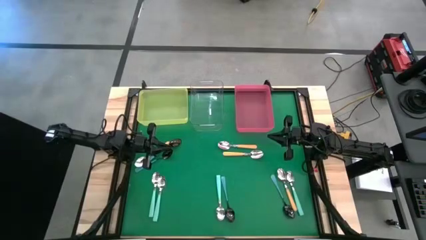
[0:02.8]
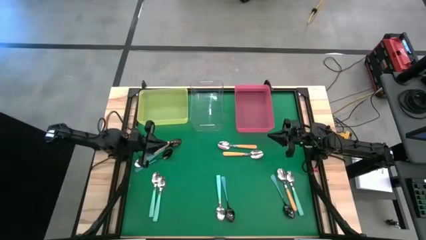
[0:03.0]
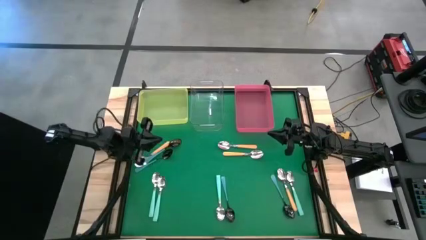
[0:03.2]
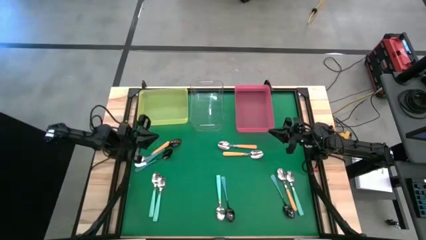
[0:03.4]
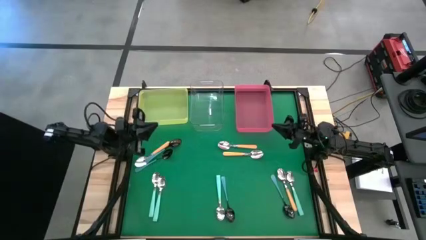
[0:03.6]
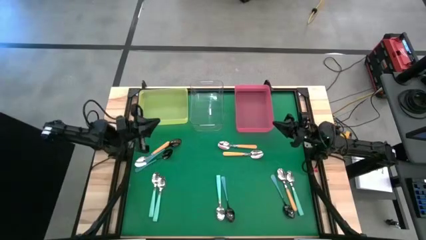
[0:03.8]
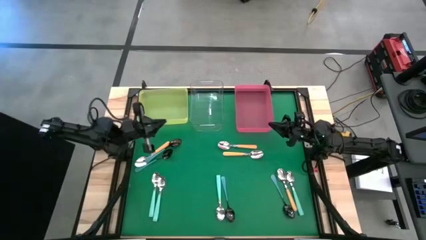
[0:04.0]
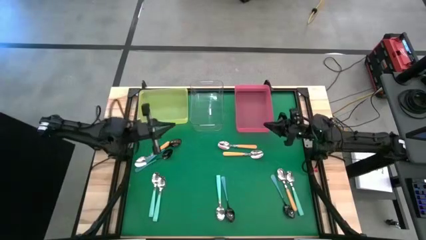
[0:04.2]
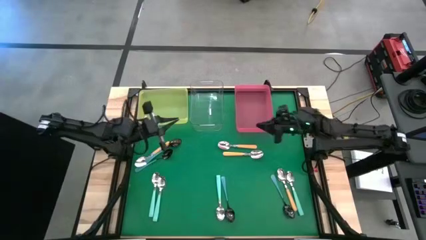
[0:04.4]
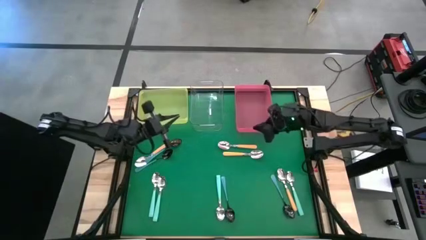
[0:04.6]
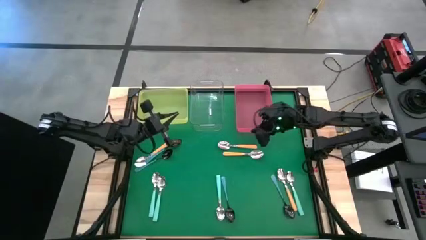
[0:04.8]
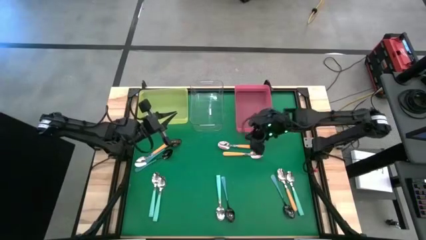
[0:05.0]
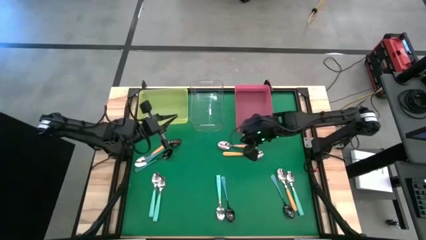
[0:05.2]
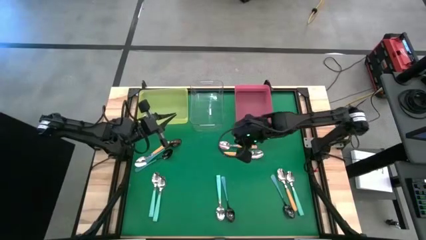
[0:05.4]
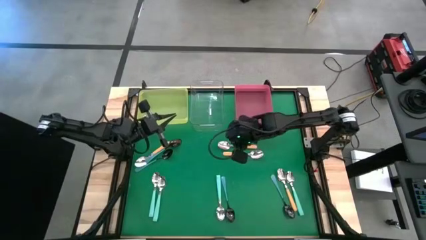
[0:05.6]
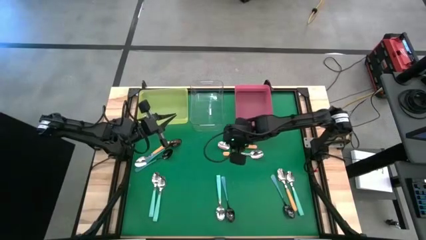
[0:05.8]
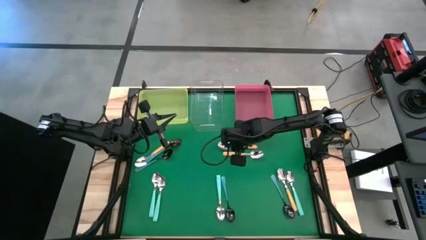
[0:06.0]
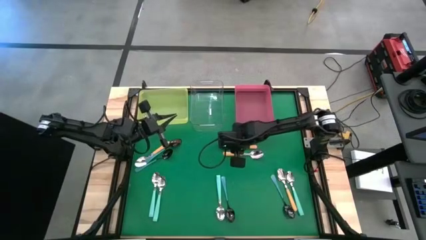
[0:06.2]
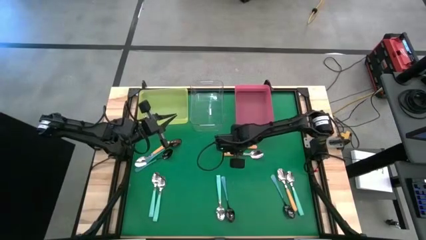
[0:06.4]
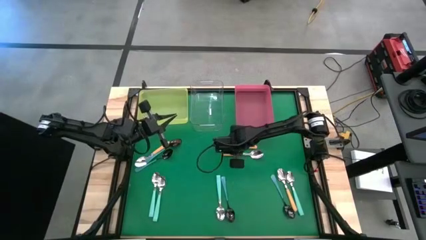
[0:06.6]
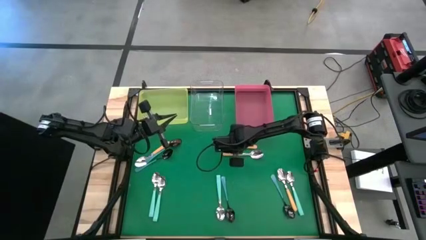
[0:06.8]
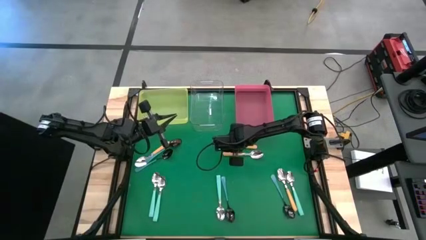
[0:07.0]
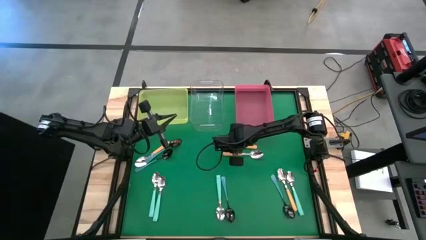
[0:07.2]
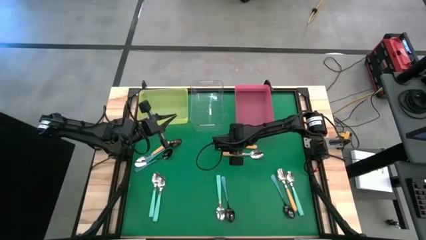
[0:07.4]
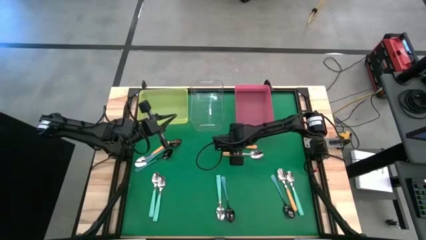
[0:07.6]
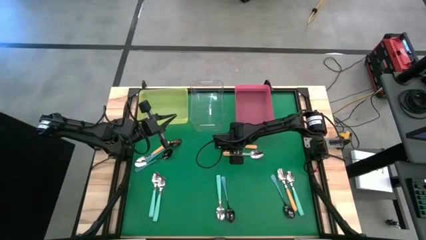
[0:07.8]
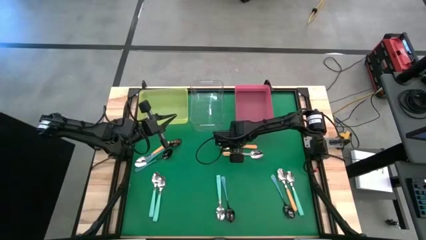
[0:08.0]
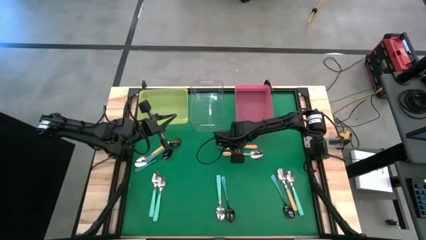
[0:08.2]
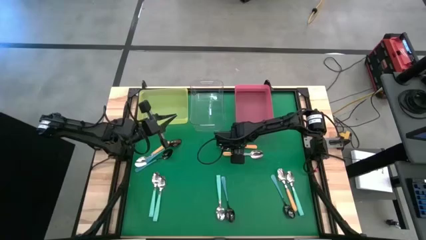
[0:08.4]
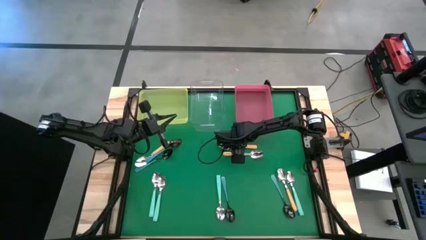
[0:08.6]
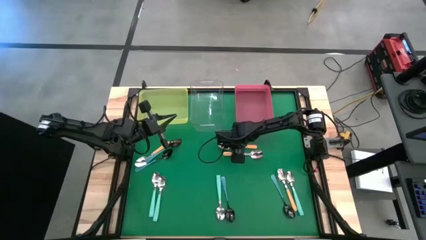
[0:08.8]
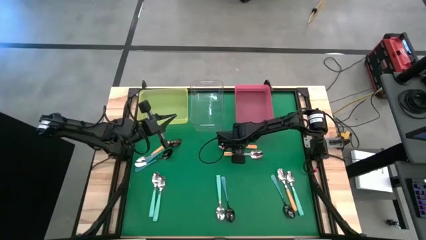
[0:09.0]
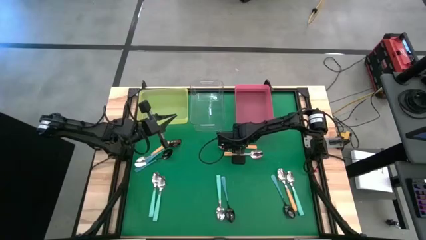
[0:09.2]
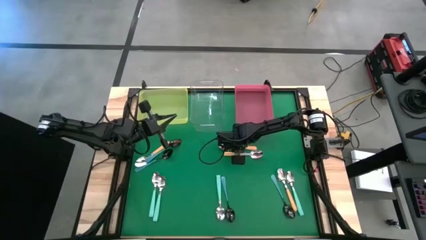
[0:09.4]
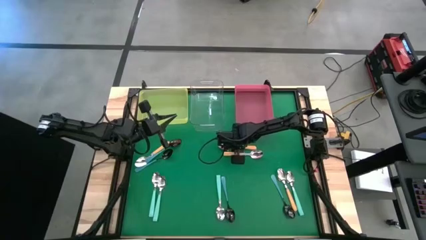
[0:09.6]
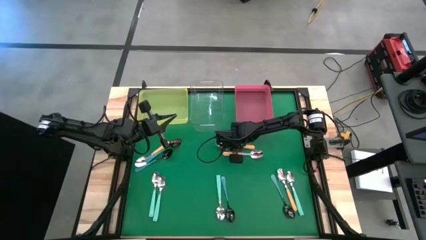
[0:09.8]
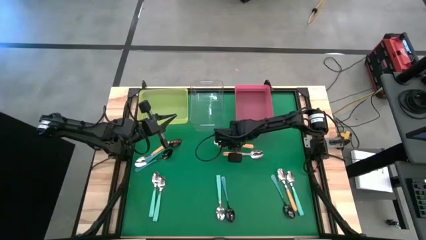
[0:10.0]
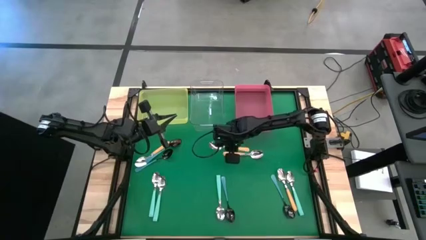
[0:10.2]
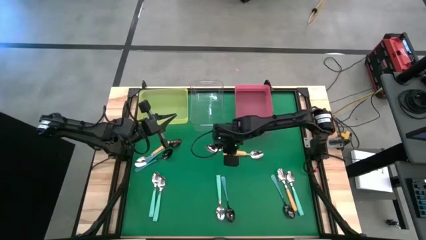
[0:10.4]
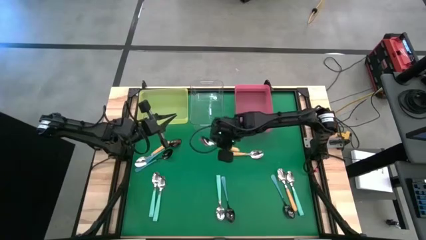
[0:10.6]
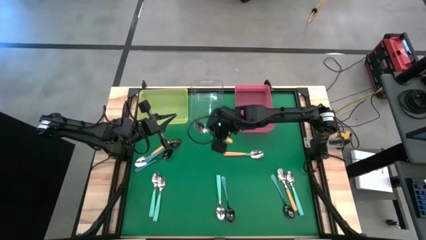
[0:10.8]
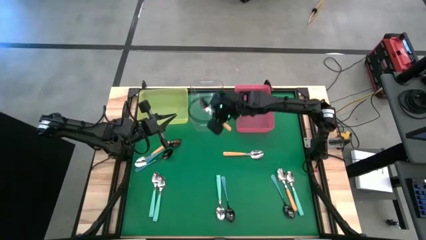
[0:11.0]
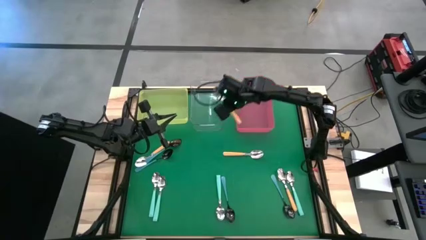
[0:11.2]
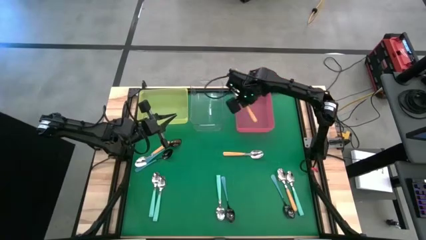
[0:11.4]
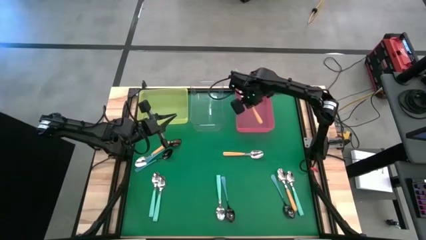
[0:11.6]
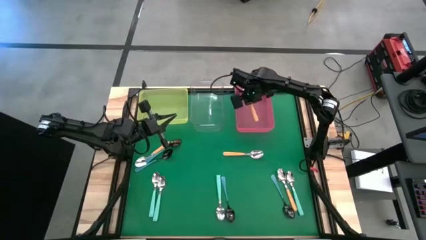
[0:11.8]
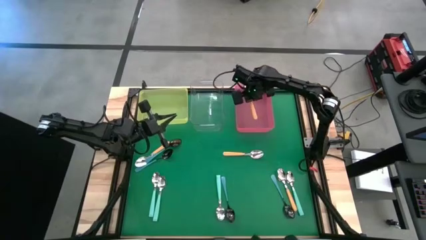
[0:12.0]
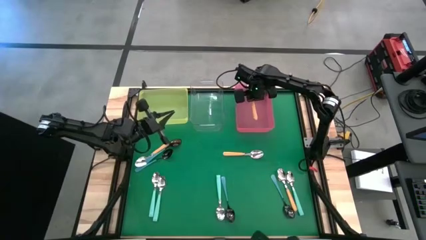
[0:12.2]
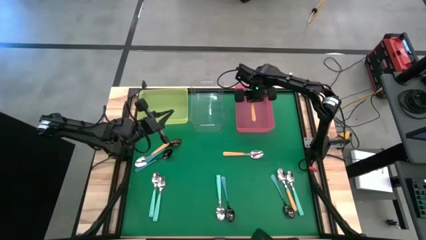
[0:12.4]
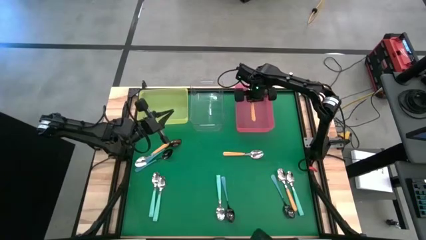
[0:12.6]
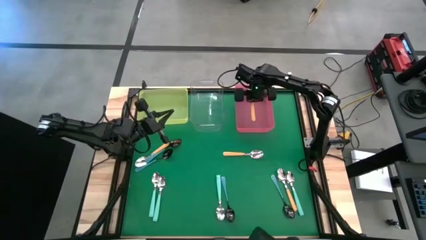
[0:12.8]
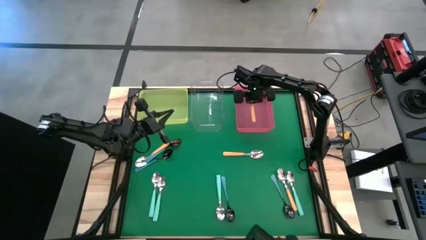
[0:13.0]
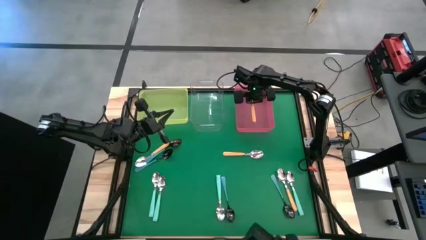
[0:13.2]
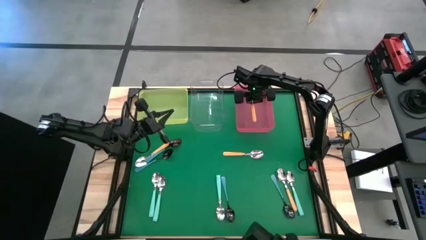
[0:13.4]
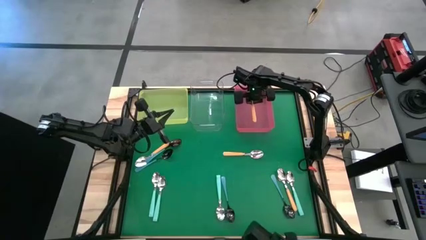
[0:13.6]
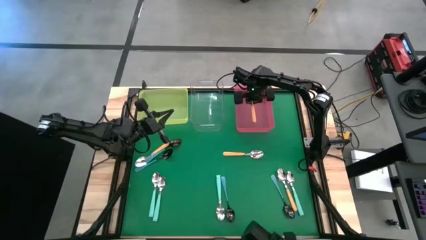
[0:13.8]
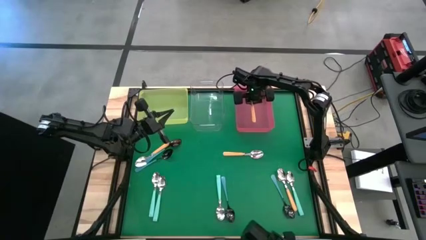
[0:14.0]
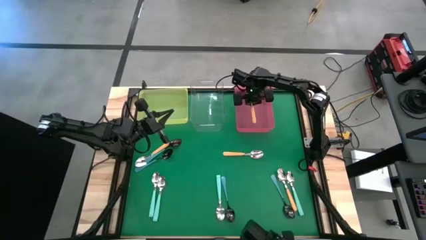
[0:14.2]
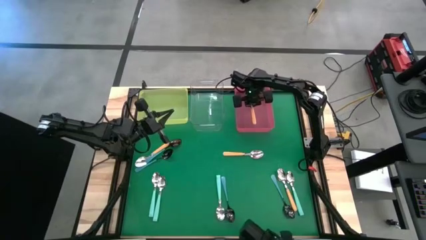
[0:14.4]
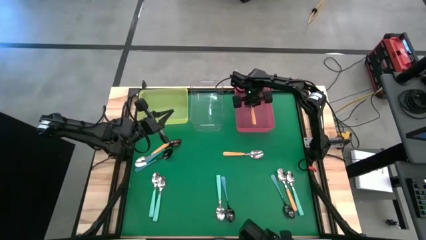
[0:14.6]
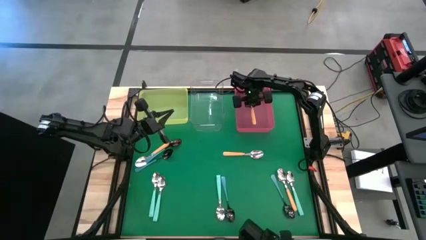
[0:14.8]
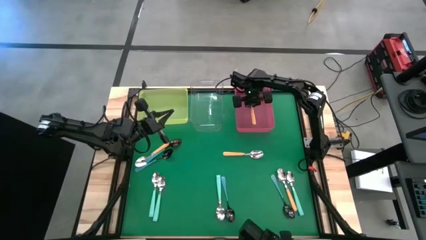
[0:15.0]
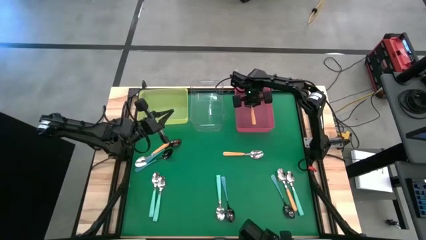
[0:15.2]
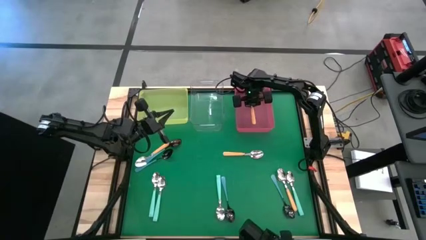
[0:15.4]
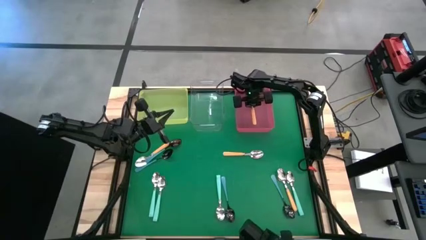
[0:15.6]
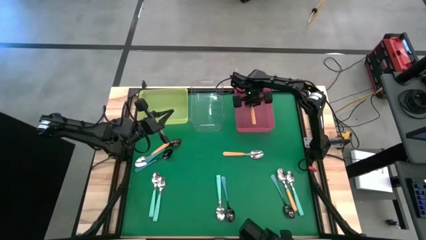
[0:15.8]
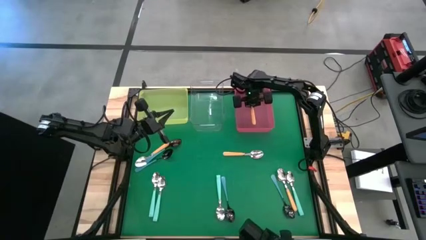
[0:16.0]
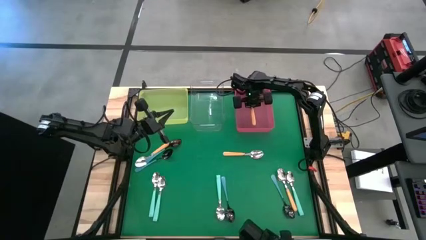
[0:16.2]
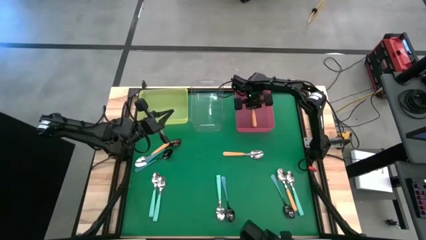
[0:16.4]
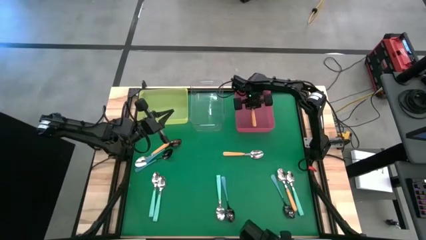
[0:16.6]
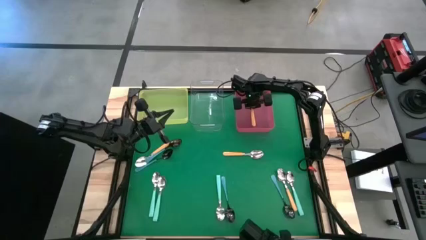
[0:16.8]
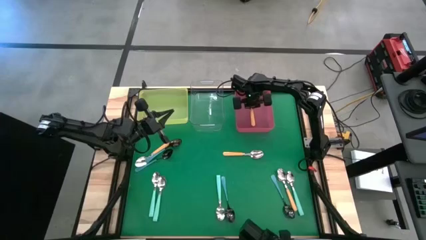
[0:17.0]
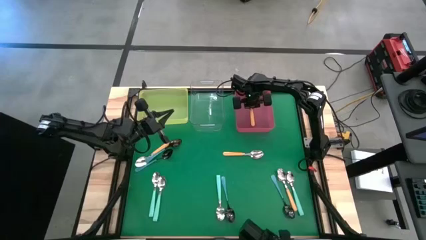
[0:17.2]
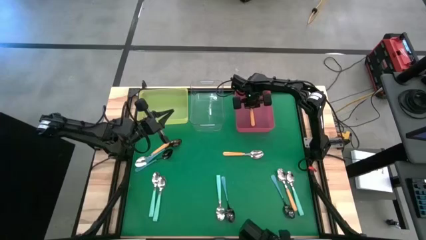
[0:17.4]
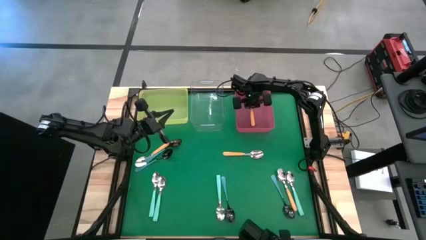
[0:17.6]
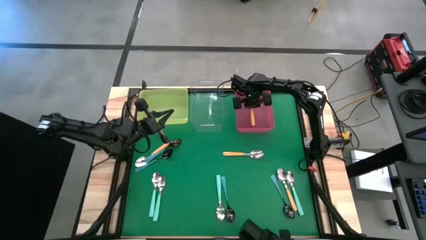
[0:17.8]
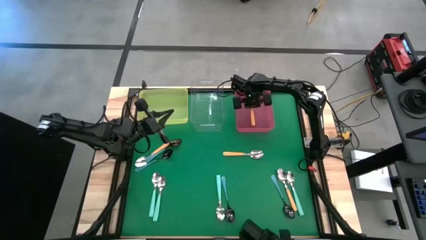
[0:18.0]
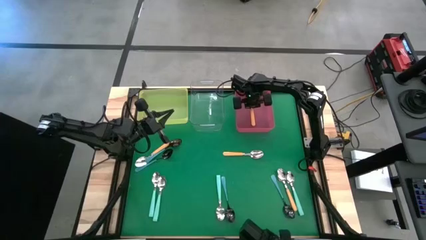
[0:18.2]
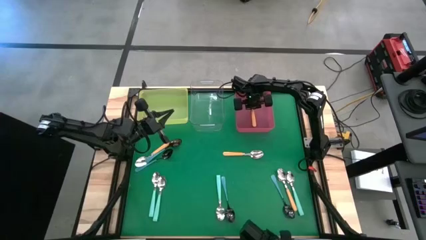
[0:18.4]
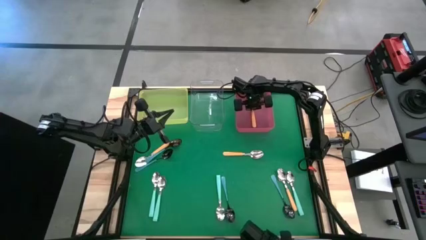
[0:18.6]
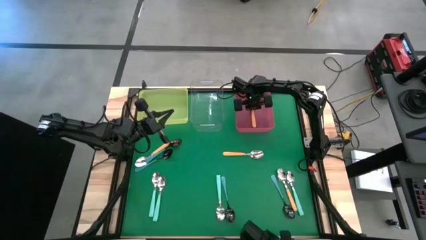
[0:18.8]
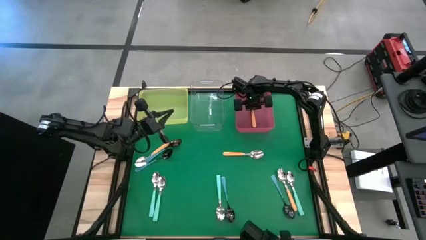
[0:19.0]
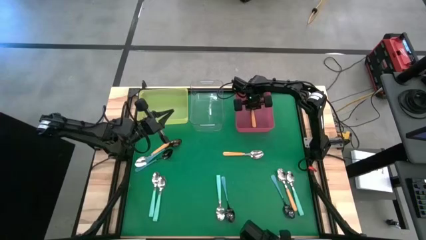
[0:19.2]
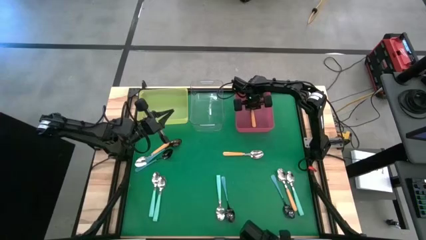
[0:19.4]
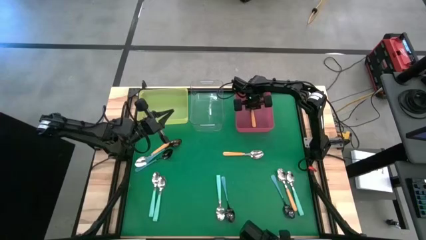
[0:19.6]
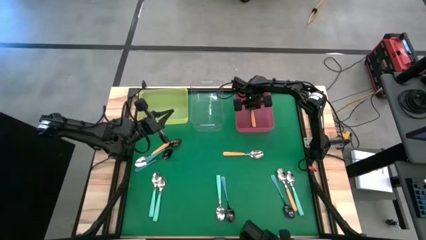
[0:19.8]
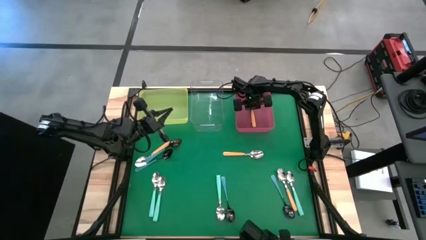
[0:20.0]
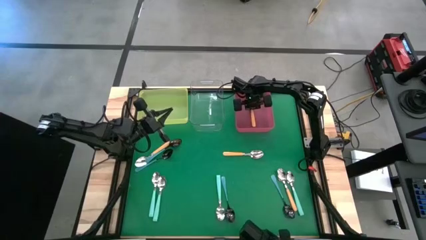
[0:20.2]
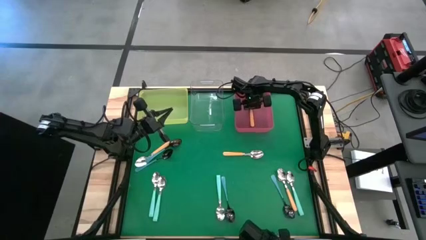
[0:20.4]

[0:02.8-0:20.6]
Task: Sort silverware by color (type)
Put the yellow spoon into the red bin
